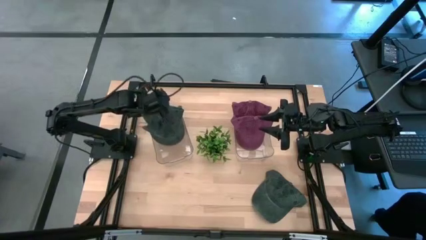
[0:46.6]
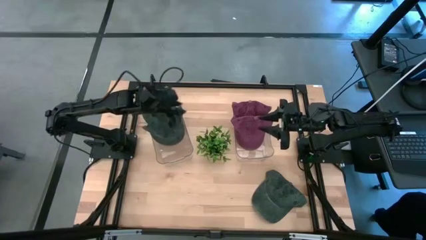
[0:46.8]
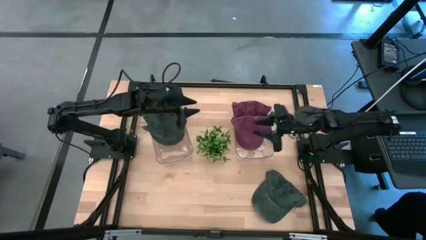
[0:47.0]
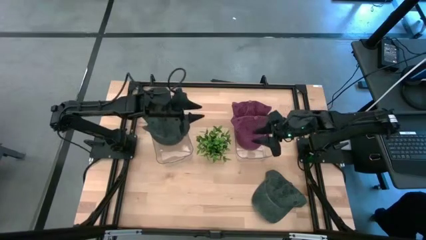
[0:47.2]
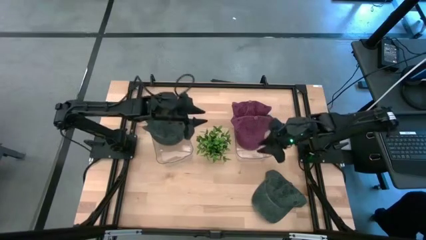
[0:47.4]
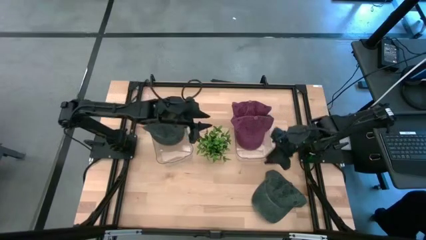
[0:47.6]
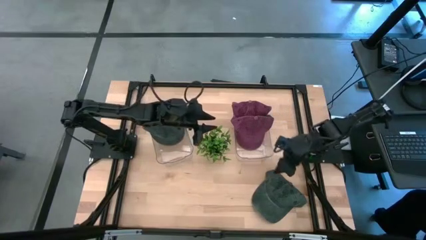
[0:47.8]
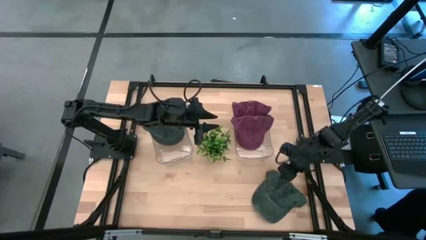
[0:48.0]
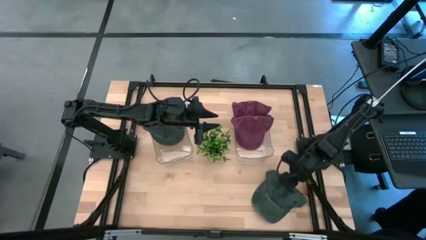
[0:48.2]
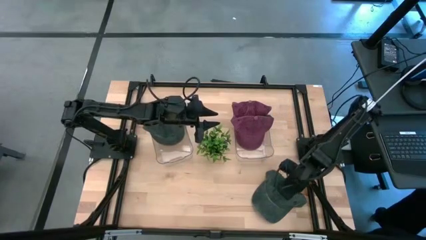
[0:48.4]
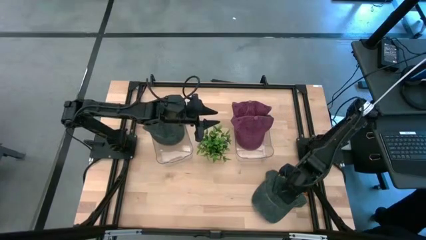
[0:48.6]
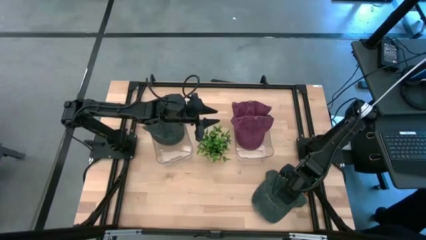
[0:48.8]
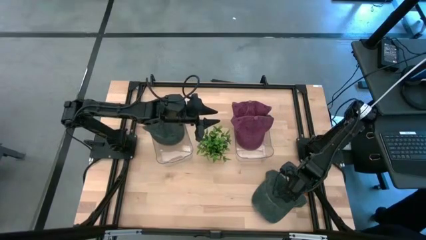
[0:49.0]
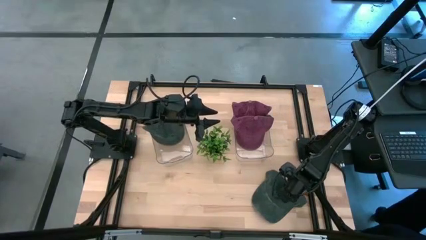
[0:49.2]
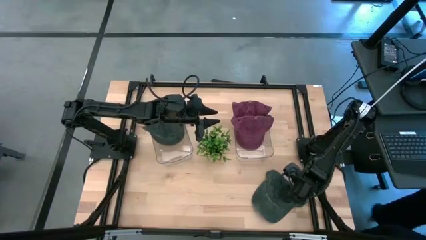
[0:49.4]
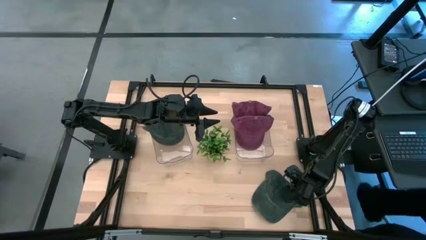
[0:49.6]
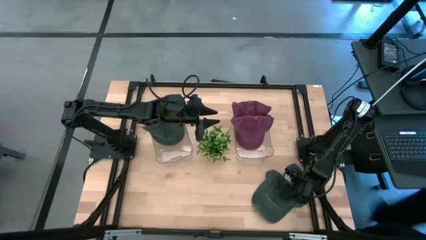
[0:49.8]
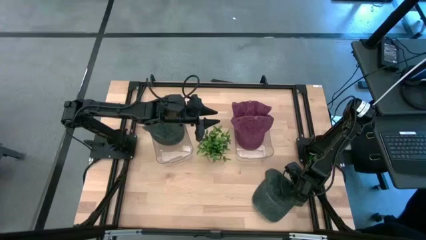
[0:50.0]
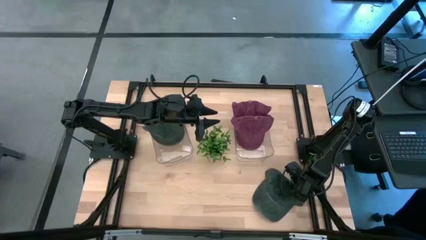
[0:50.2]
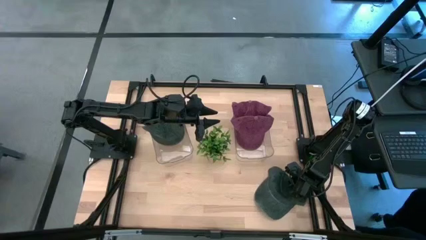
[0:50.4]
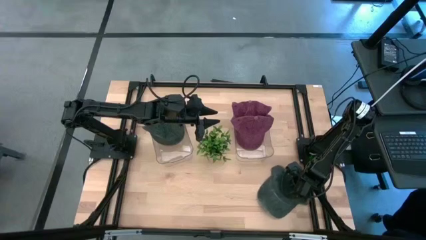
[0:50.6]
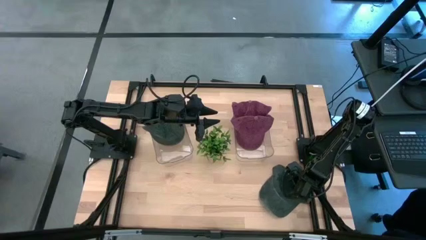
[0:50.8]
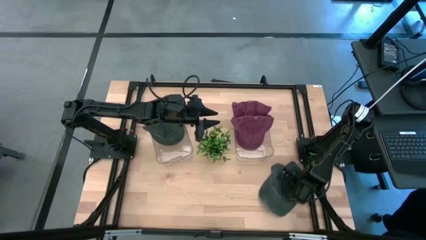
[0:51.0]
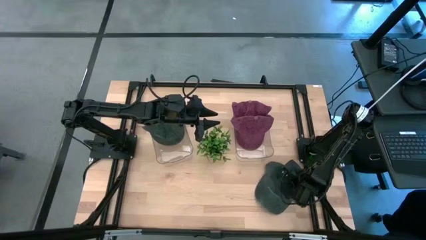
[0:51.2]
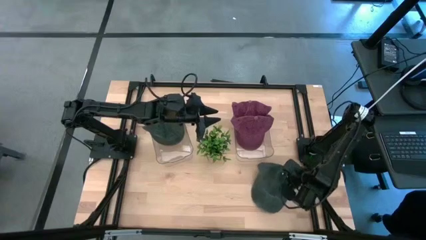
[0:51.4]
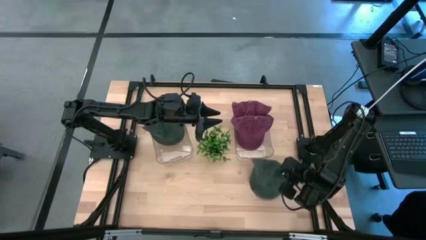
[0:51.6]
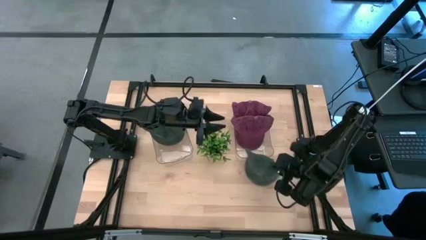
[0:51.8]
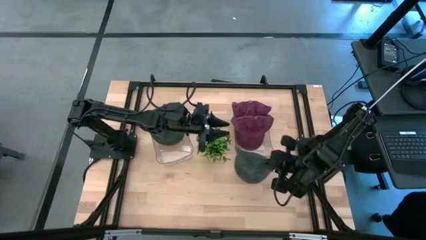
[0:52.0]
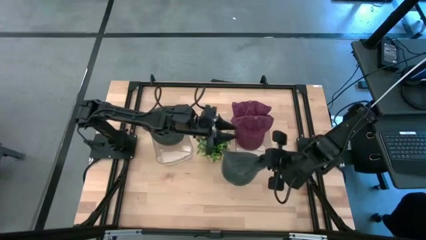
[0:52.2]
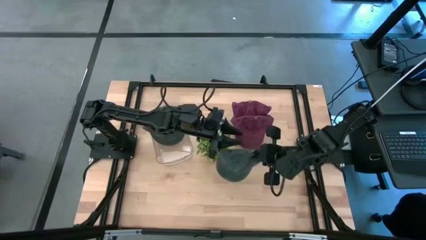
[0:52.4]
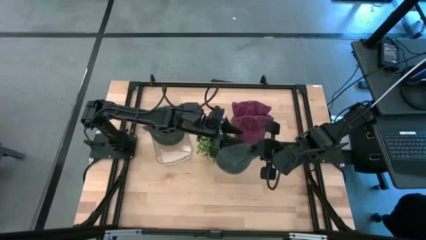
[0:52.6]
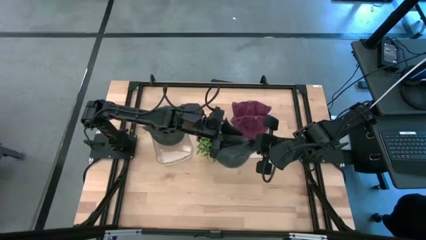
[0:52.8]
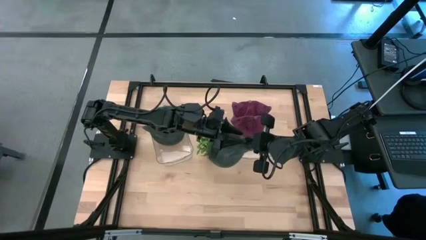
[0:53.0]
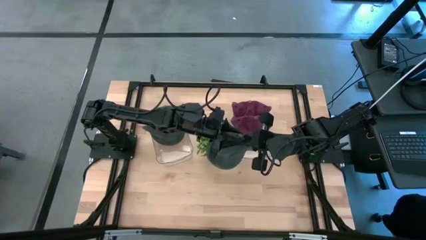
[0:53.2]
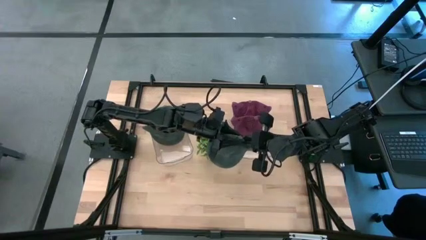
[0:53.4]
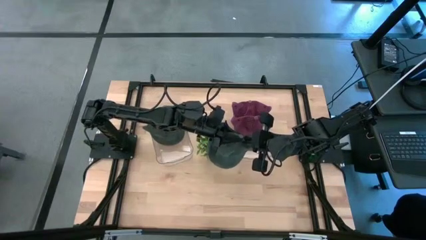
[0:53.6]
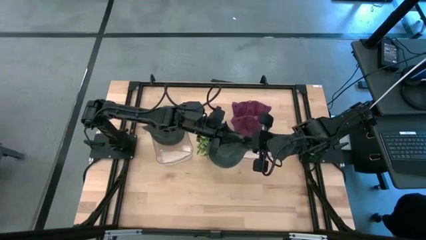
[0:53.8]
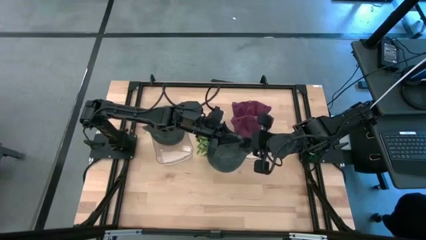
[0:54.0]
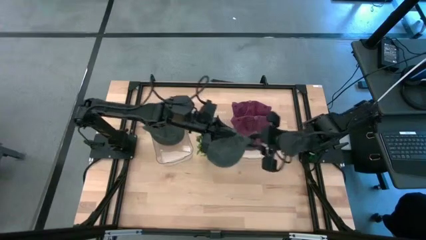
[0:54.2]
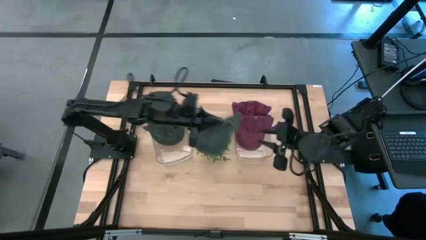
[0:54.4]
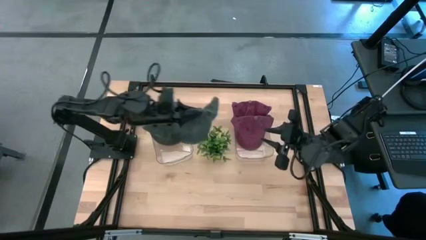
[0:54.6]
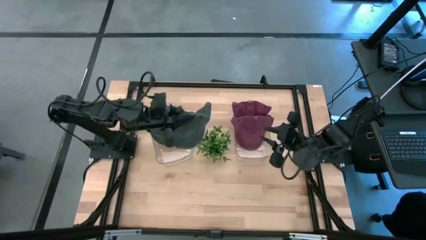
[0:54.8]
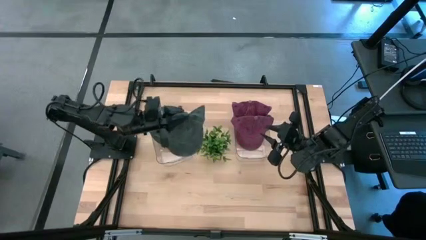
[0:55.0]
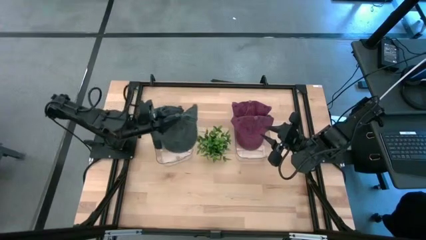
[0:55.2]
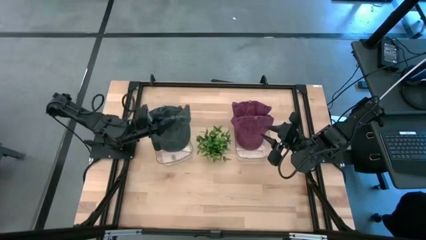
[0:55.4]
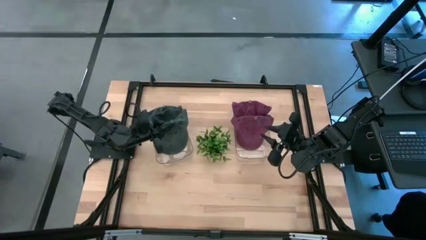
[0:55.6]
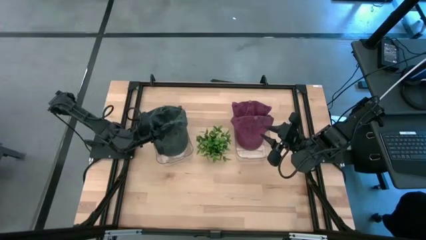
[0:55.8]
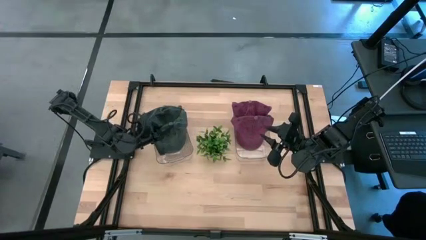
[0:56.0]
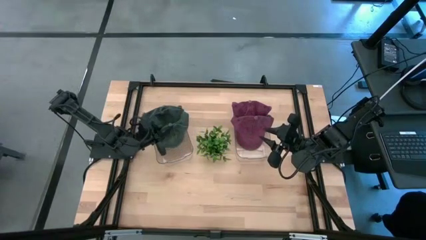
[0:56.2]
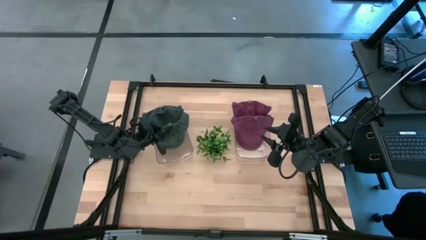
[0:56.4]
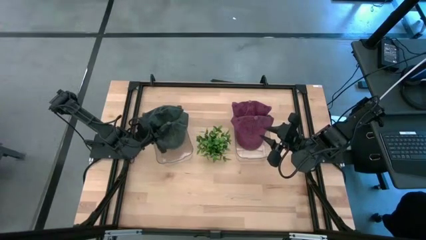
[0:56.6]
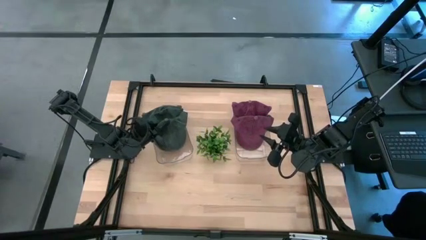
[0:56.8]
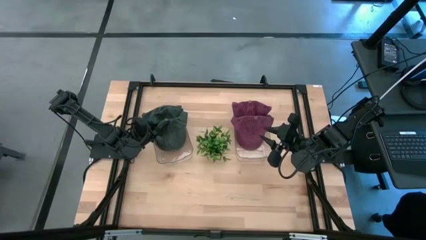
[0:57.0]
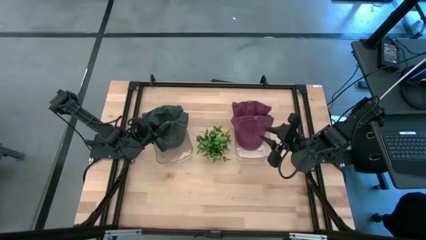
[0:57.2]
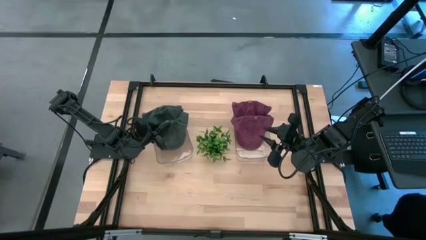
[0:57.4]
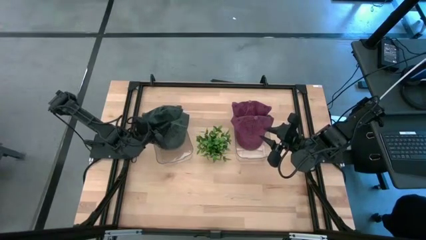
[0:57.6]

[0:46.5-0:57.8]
Task: Pick & Place hat
Put the black cap into the left transparent bin

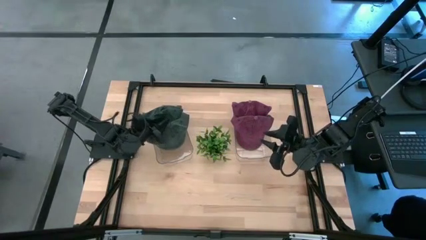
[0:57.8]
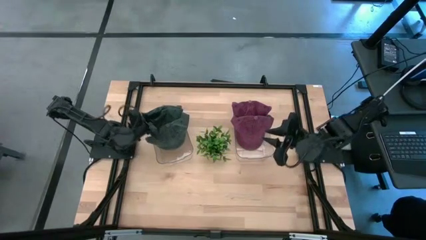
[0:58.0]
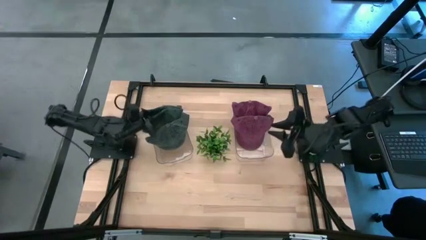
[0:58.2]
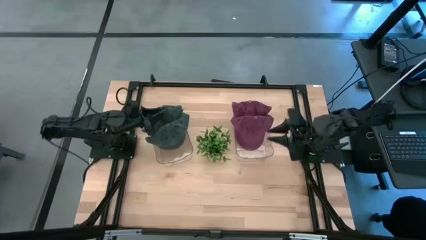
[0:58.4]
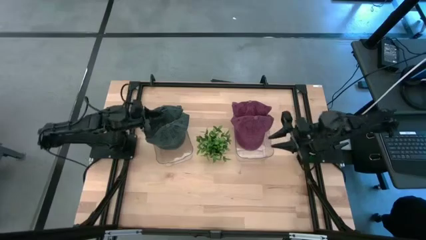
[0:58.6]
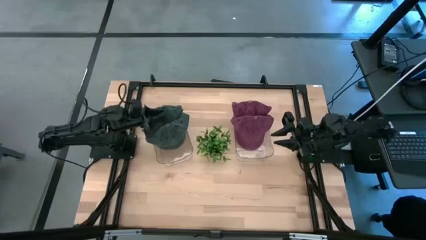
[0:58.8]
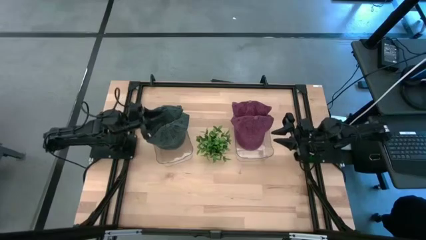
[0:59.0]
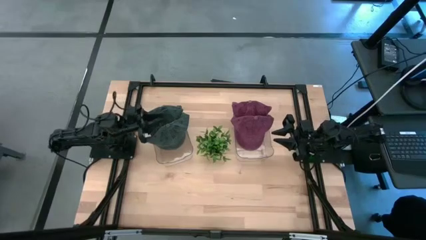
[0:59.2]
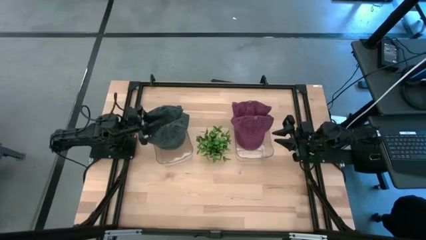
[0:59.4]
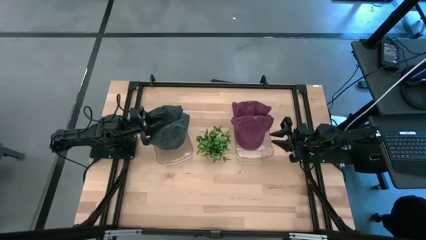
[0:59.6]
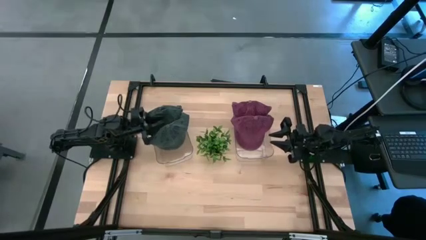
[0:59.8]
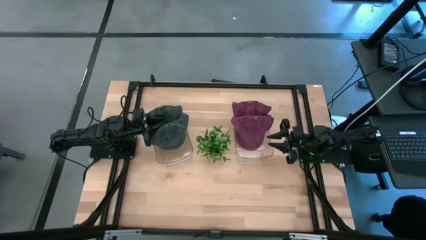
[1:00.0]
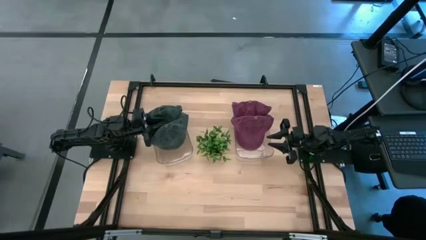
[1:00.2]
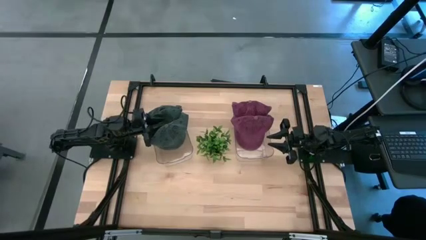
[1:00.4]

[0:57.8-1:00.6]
Return to home position
